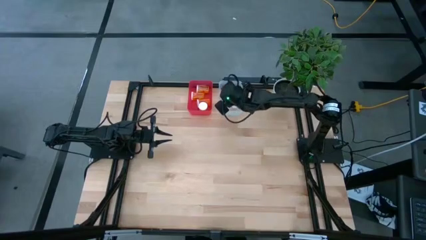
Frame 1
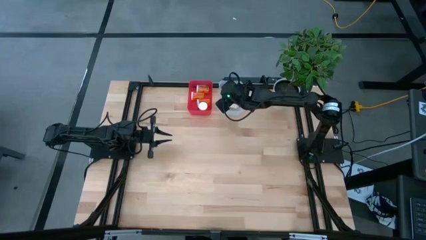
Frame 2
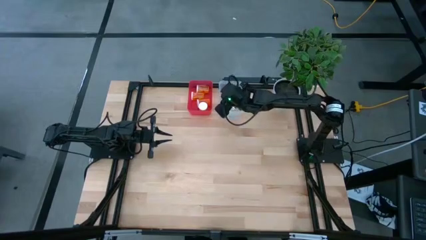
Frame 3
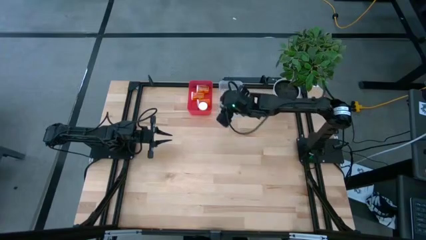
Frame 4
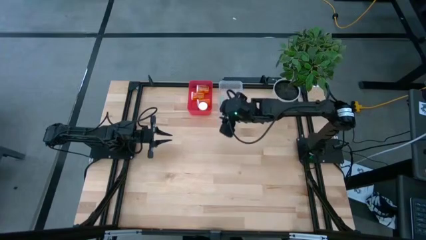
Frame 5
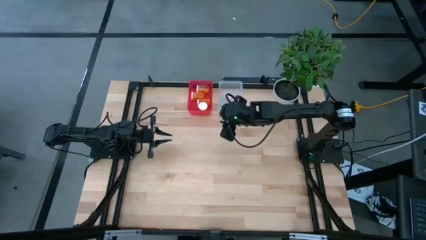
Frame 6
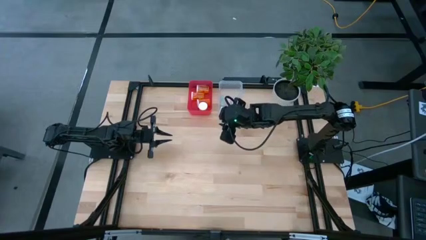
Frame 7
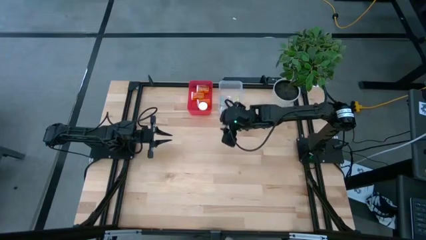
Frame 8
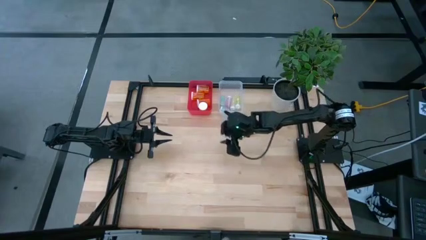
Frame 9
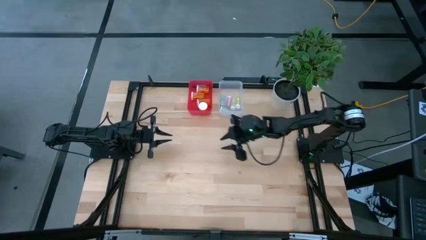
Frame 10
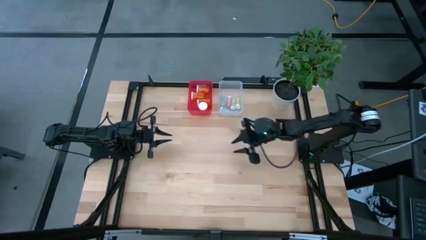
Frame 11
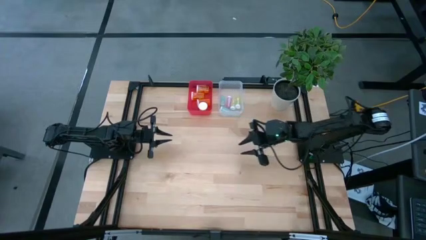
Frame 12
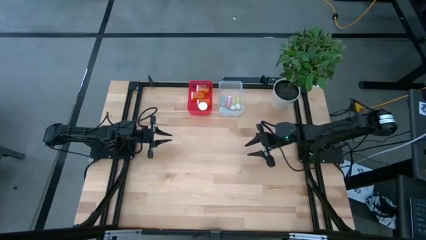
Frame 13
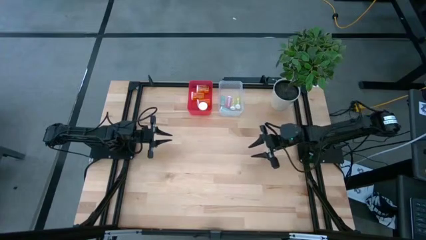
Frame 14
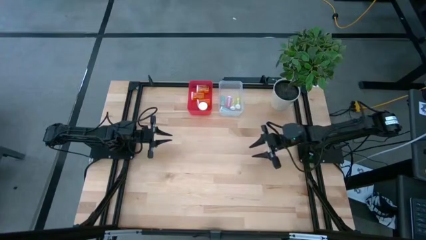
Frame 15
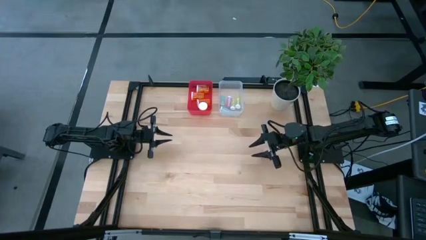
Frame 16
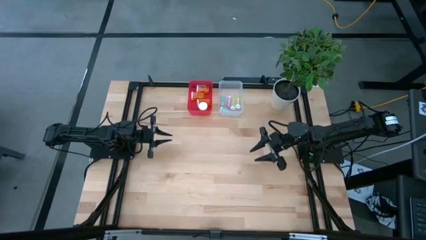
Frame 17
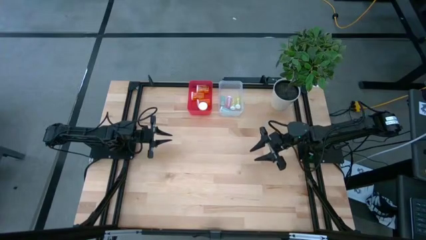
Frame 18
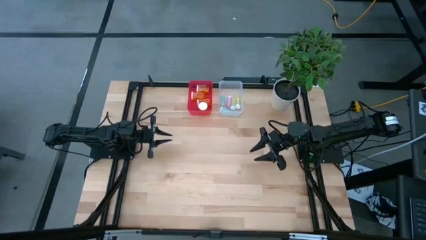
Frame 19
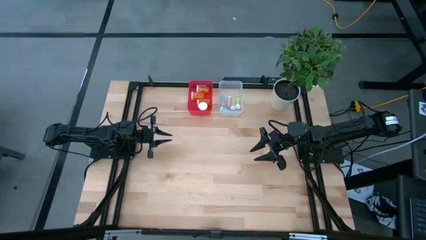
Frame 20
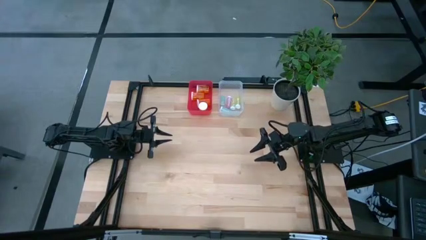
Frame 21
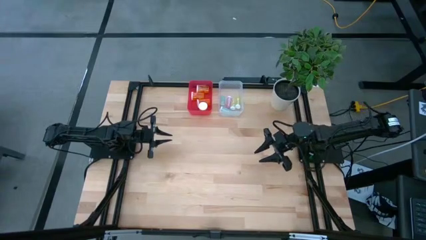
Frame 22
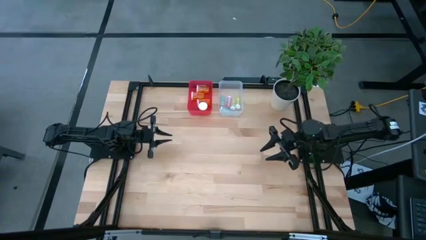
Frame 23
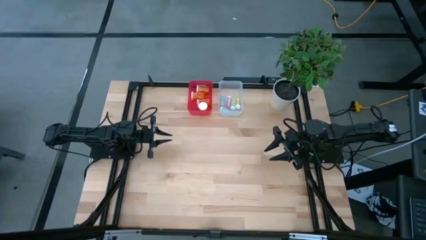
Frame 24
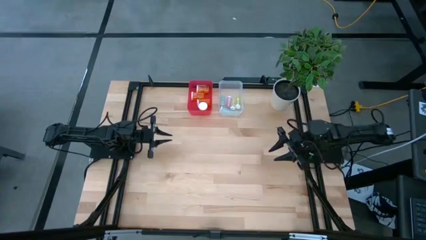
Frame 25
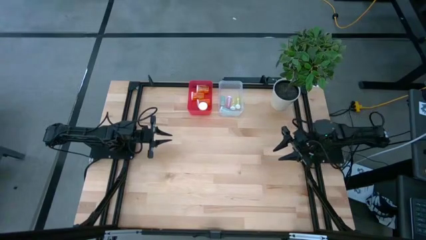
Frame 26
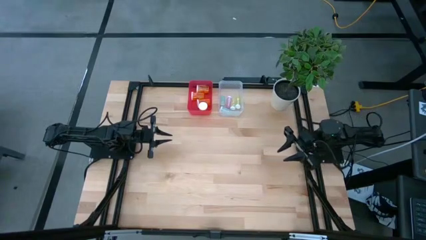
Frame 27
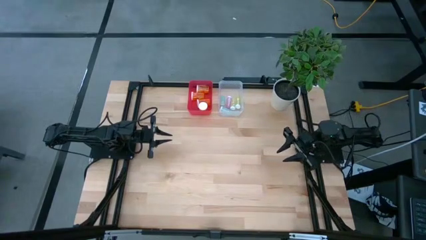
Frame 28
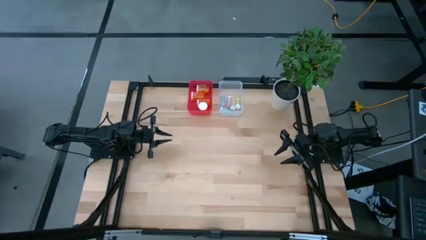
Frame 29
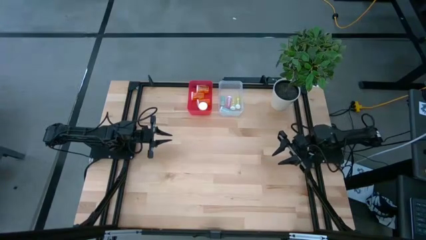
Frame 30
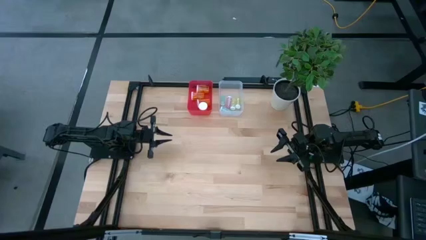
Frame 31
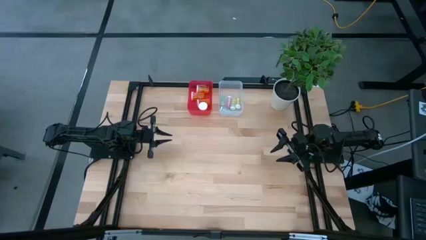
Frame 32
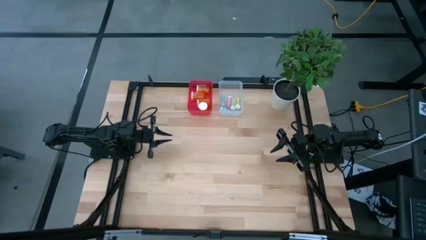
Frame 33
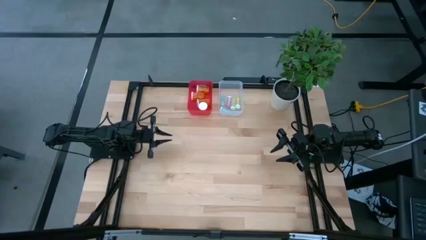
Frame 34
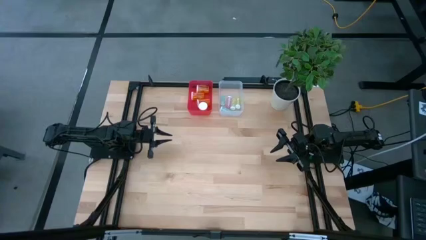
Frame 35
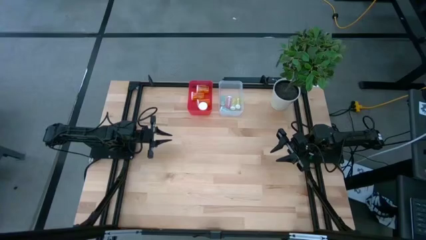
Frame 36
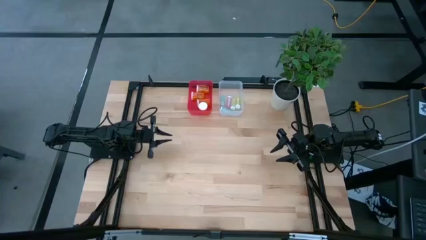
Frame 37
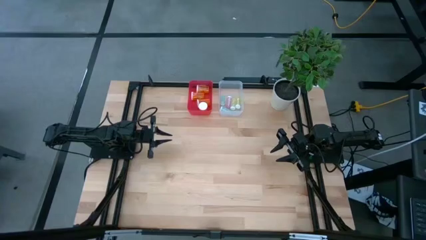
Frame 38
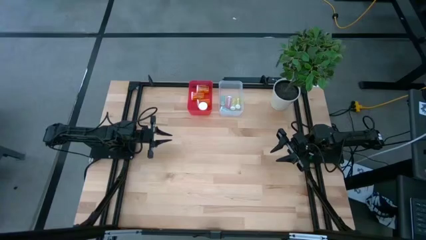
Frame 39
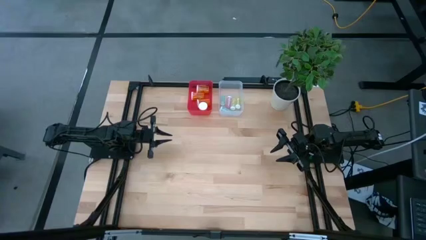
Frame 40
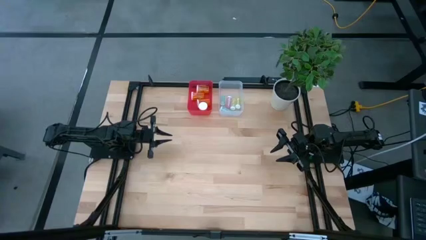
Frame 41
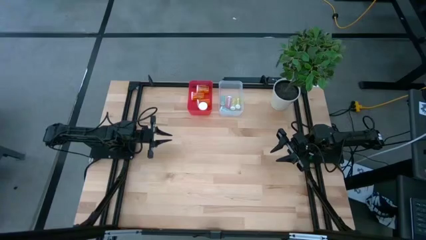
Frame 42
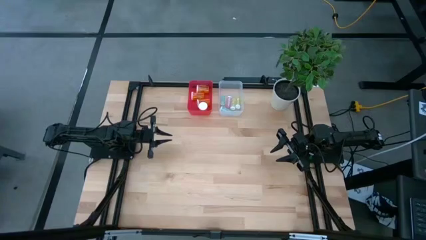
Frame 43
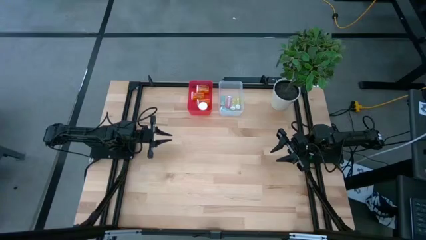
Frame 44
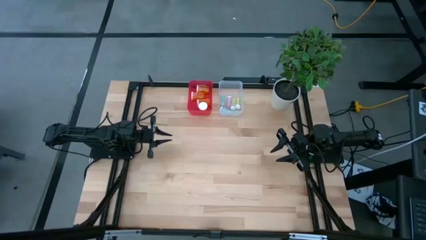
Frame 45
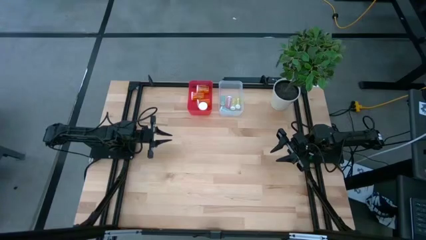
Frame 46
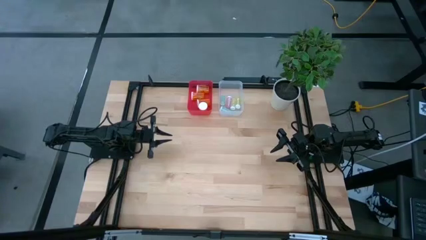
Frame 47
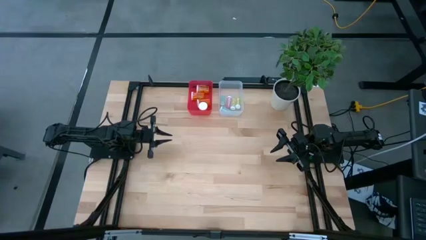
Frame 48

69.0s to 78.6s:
Task: Pick and place medicine bottles into bin by pill shape (circle, oval)
Return to Home Position

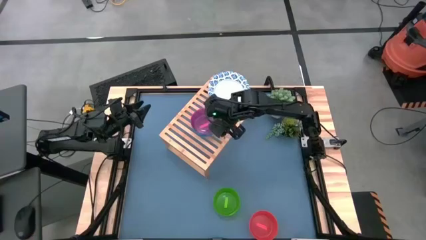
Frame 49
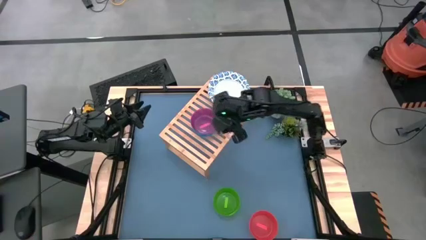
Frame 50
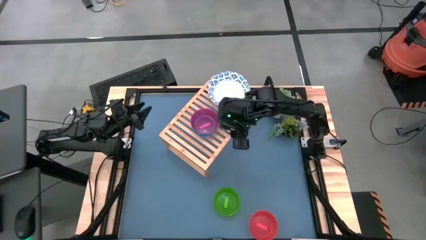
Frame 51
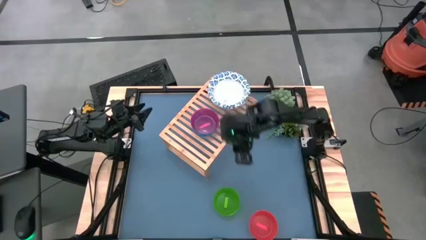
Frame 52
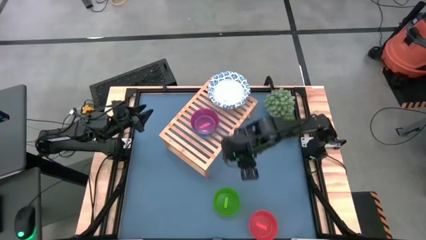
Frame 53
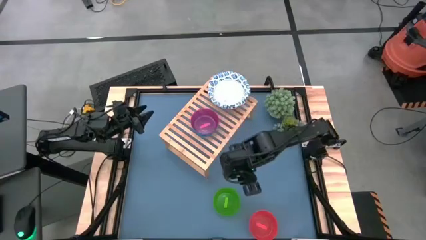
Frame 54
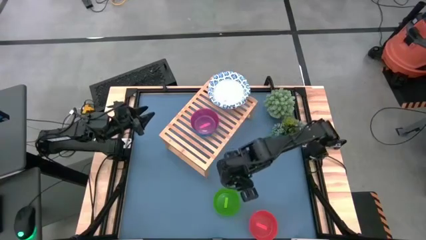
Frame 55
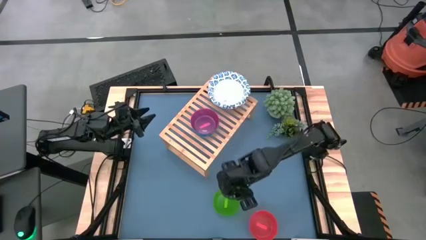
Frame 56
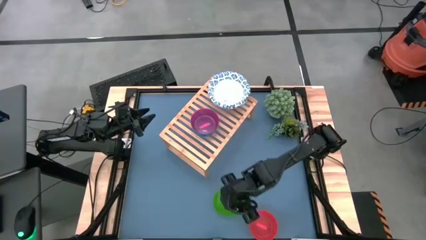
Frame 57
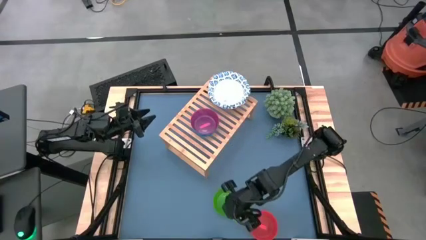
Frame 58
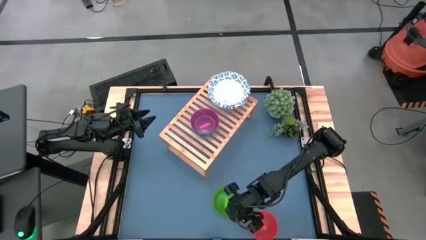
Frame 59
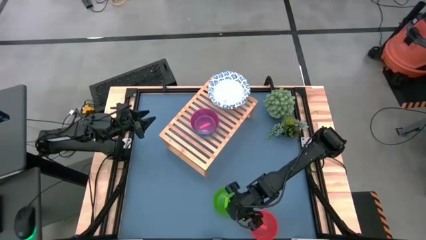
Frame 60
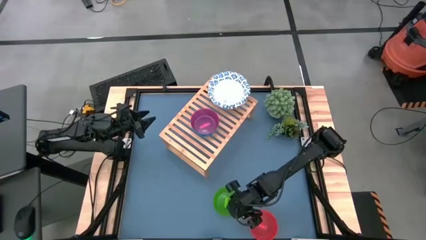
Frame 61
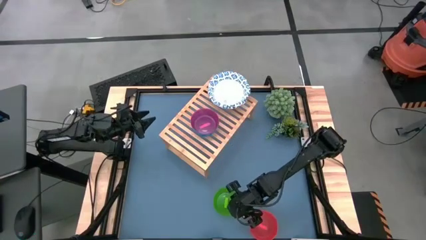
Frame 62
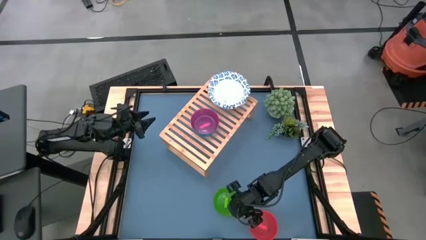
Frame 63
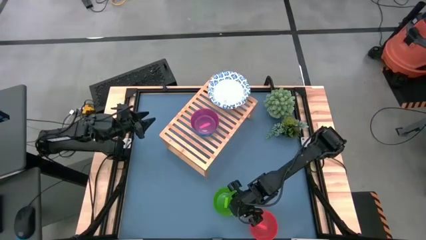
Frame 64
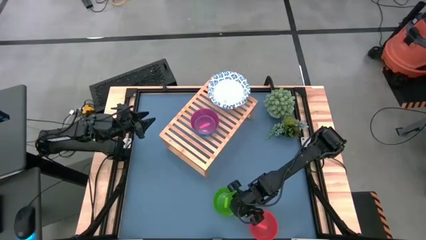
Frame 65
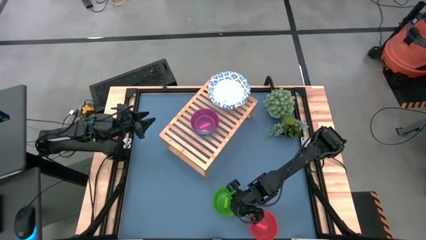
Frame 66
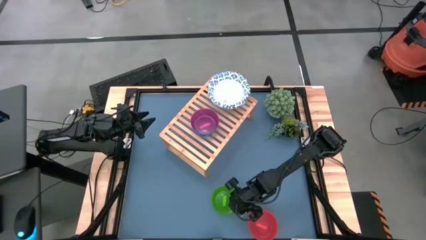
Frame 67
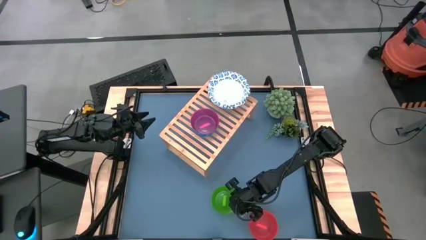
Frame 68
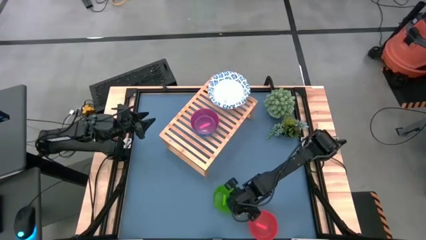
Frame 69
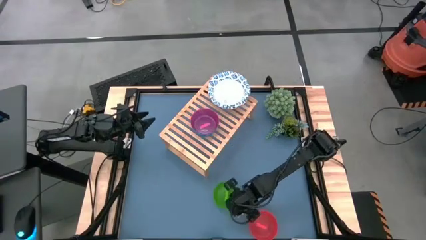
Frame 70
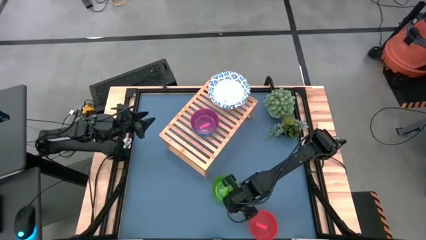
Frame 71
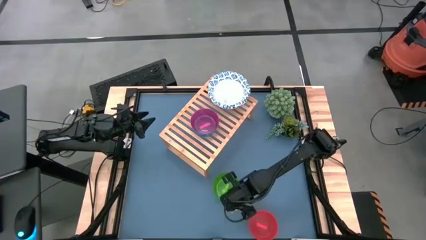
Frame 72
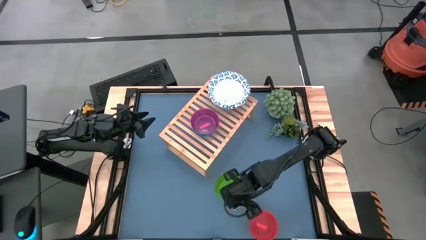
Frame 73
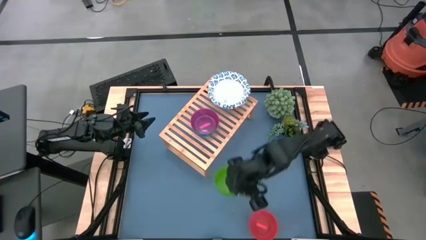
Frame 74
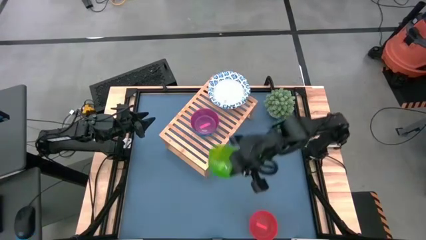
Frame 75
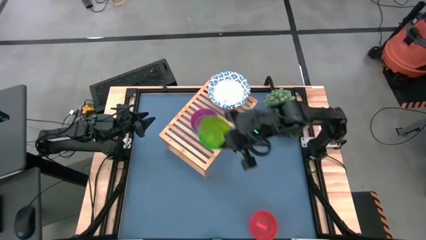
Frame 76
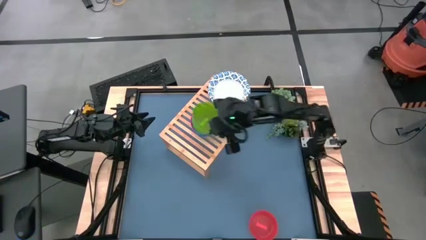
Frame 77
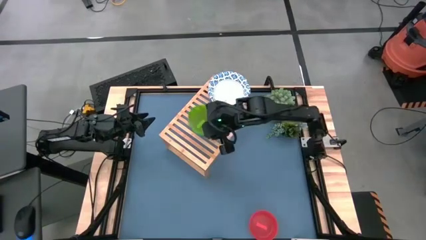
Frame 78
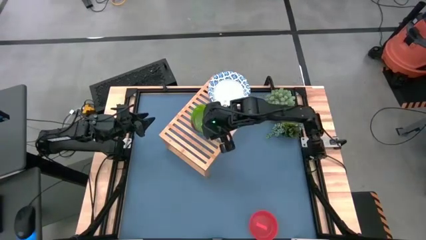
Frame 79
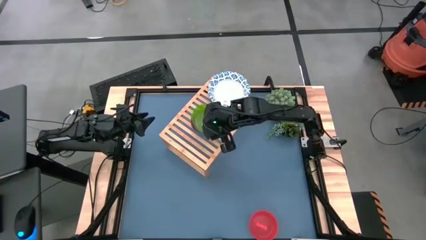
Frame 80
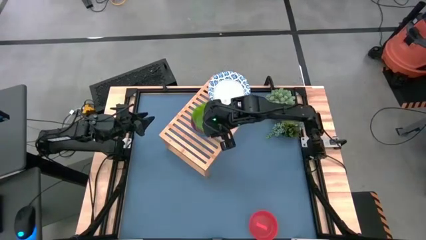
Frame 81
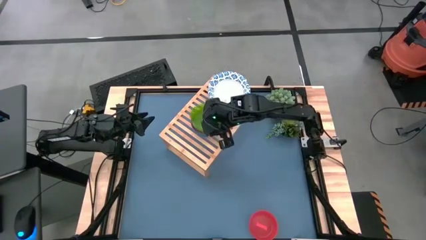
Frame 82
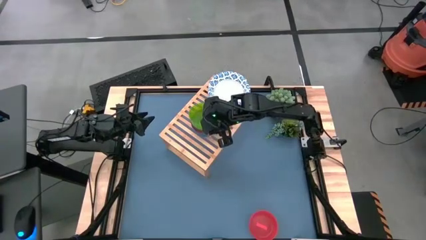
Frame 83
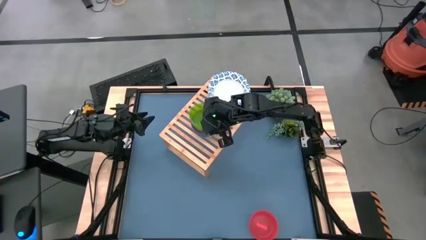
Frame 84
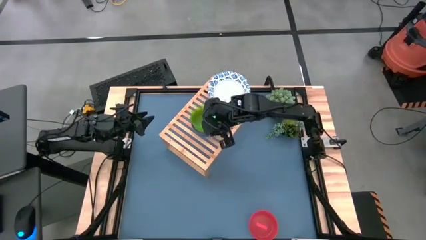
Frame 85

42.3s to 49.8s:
Task: Place and stack bowls onto a shelf
Stack the green bowl on top of the pink bowl on the shelf

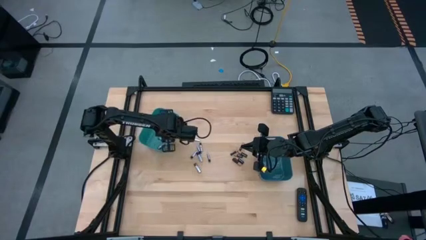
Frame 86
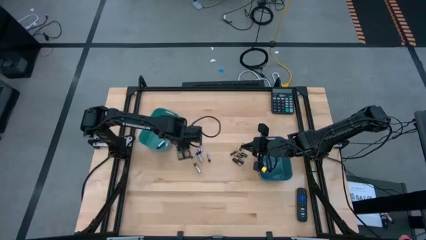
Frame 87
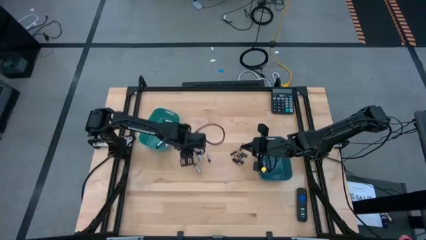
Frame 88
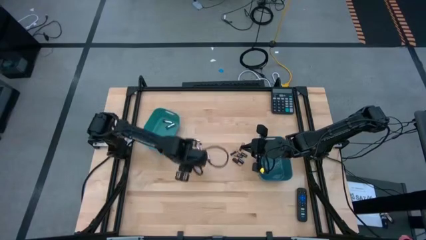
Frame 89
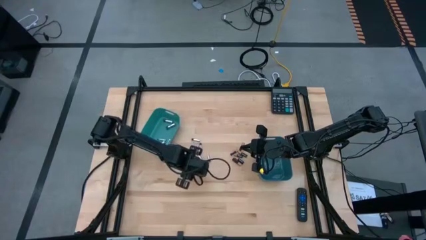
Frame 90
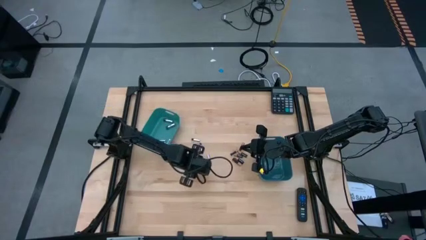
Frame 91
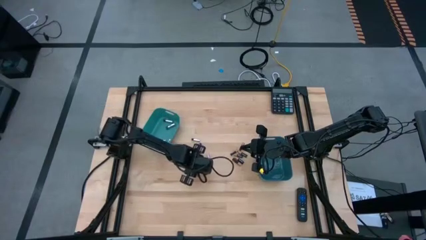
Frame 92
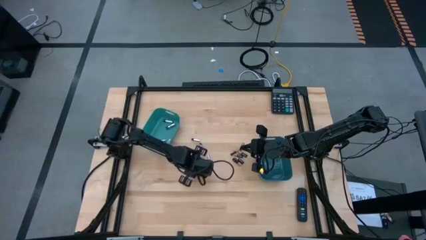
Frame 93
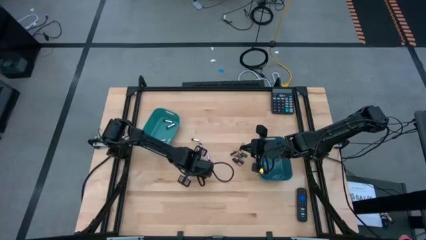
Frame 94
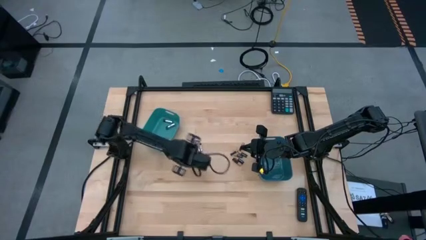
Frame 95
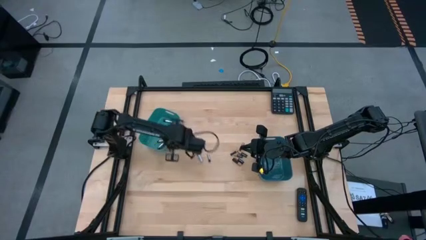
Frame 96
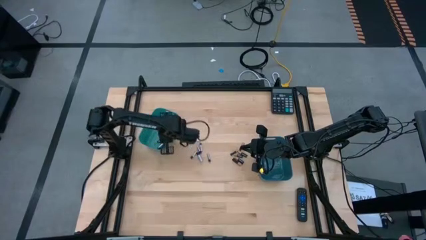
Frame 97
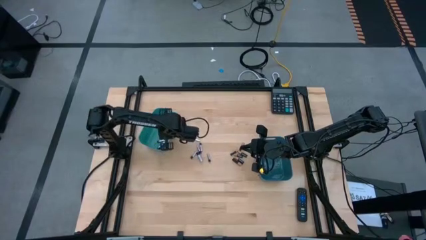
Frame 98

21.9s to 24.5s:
Task: Sort batteries
Put the silver battery into the green bin
